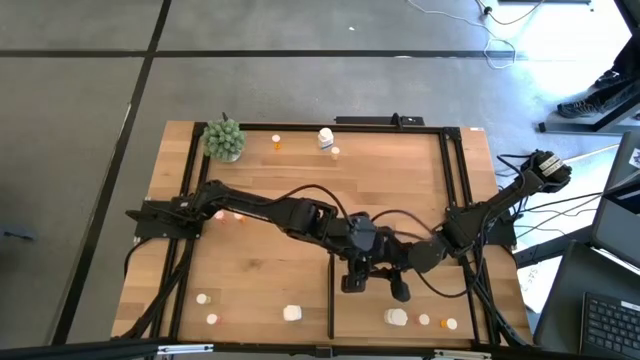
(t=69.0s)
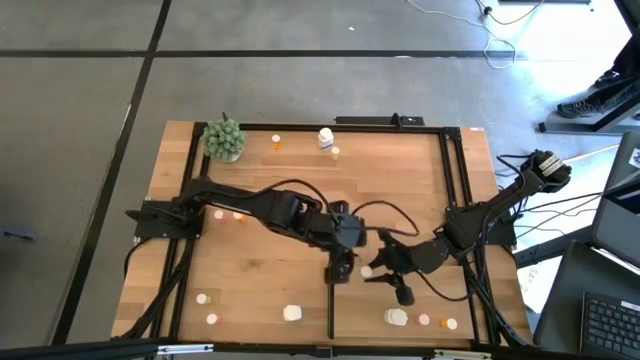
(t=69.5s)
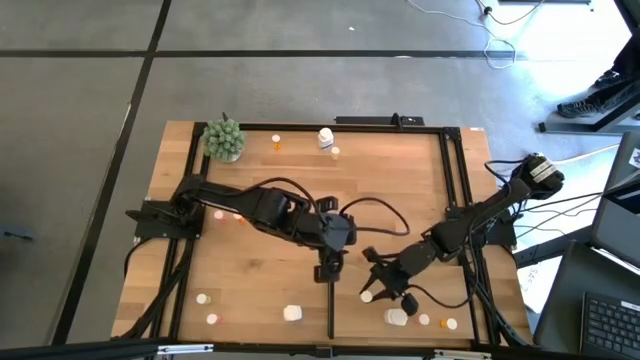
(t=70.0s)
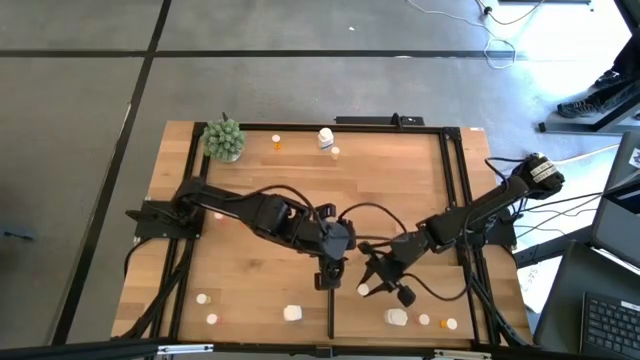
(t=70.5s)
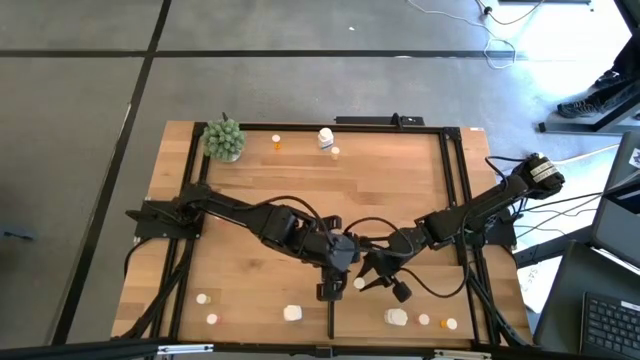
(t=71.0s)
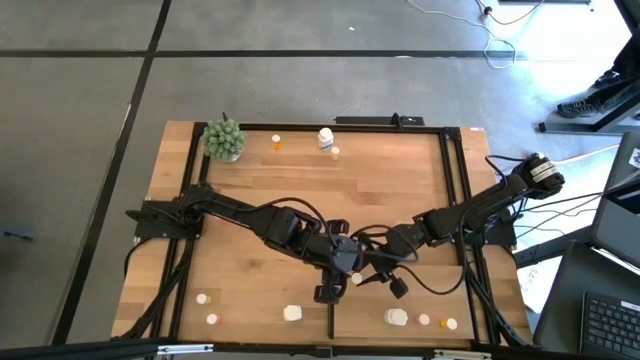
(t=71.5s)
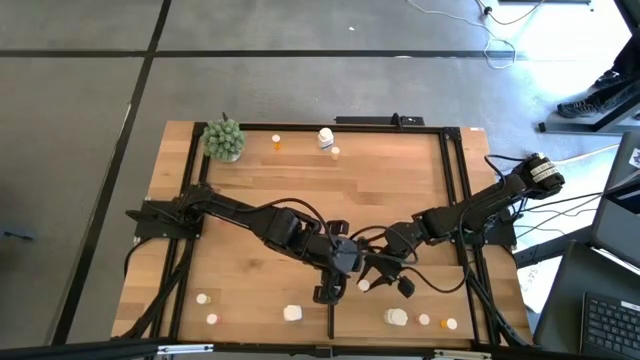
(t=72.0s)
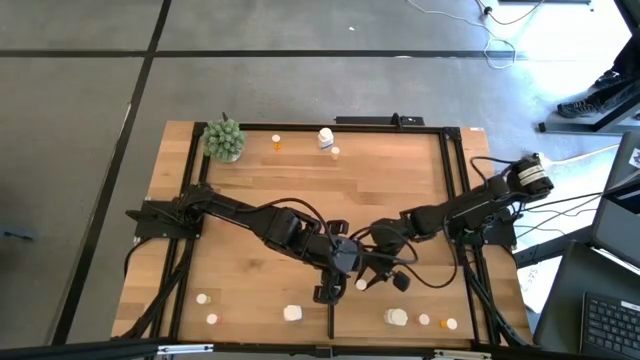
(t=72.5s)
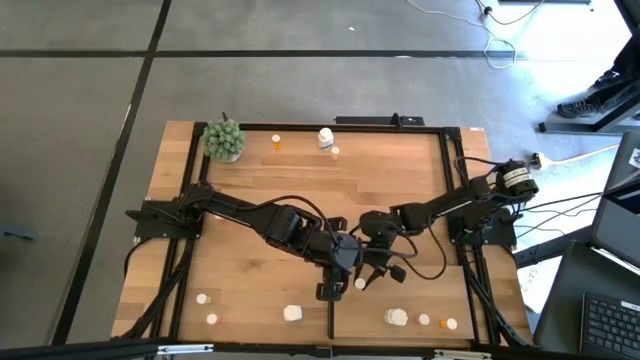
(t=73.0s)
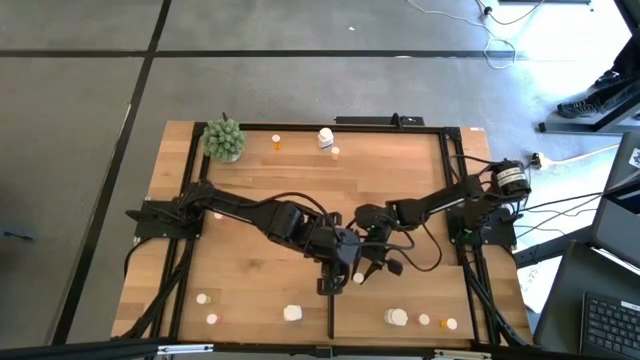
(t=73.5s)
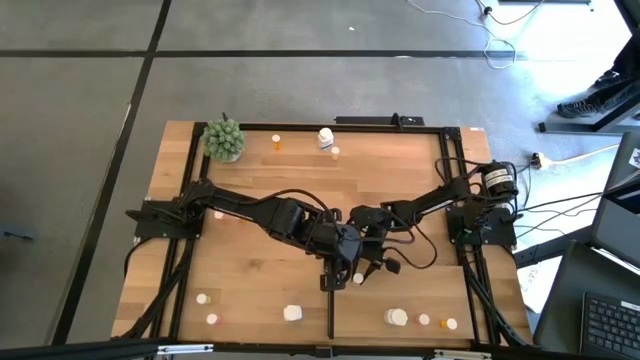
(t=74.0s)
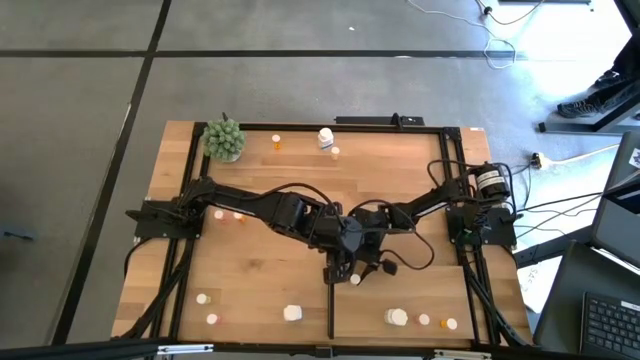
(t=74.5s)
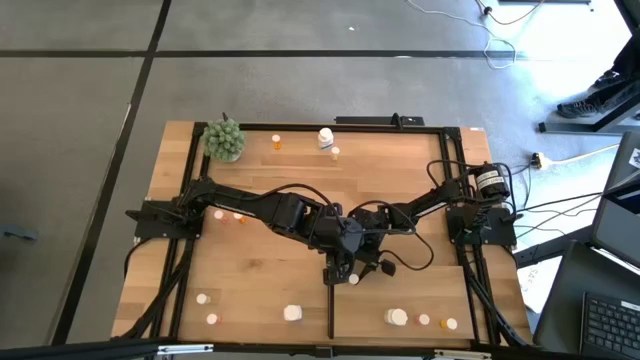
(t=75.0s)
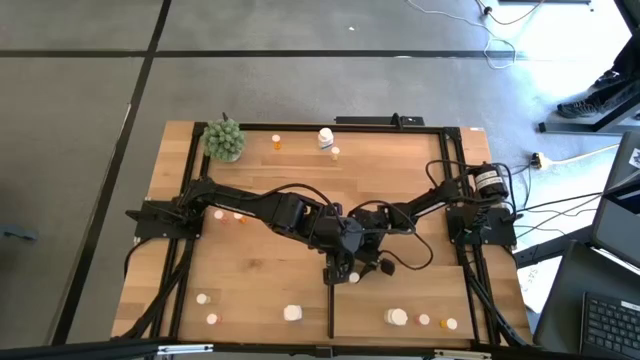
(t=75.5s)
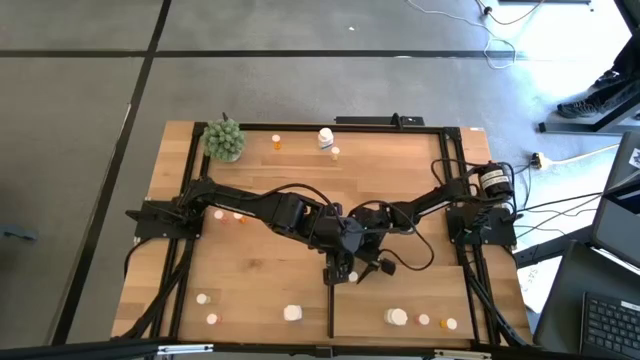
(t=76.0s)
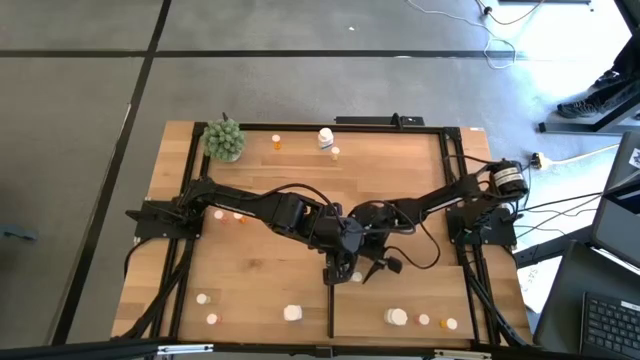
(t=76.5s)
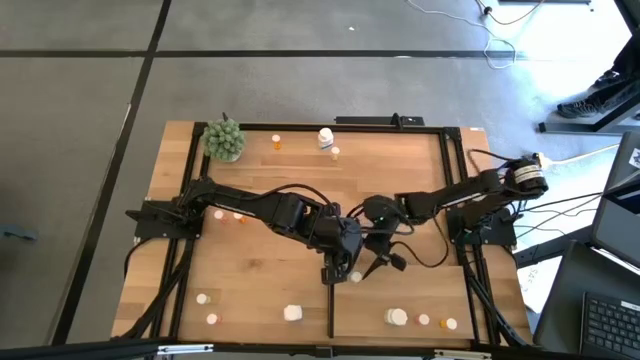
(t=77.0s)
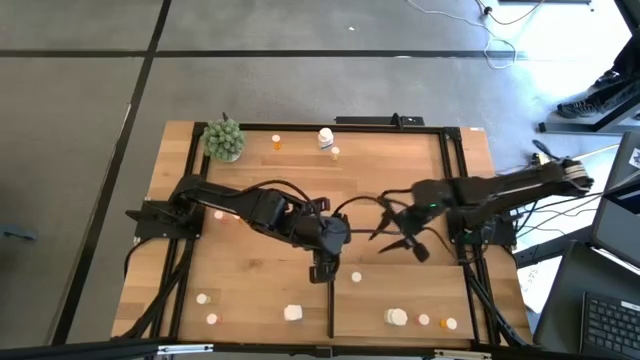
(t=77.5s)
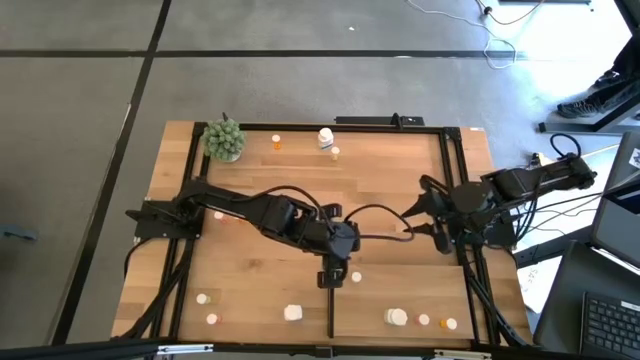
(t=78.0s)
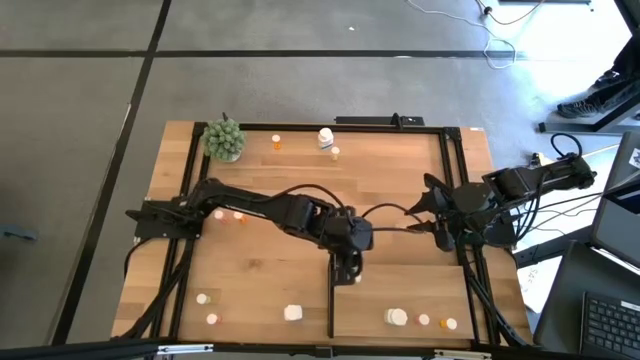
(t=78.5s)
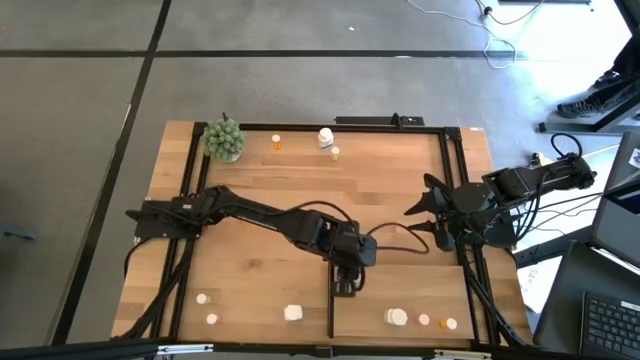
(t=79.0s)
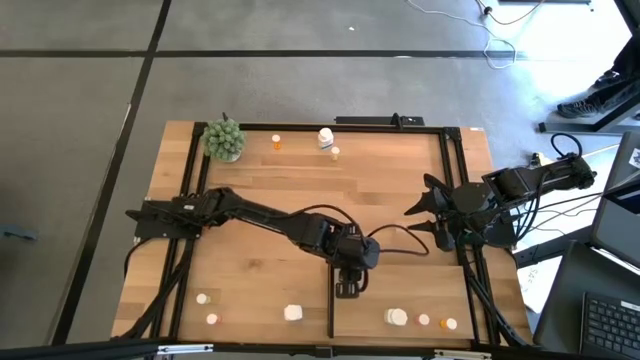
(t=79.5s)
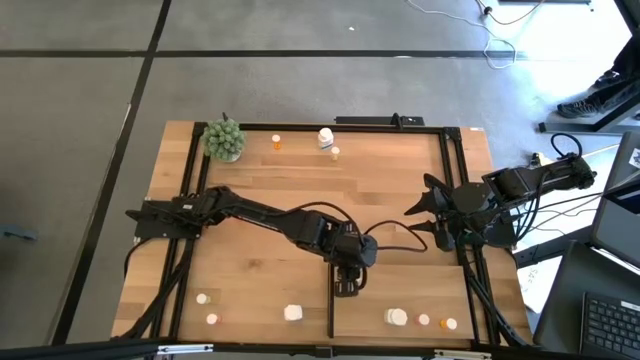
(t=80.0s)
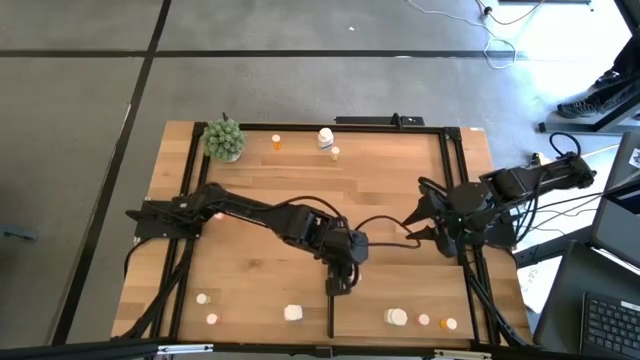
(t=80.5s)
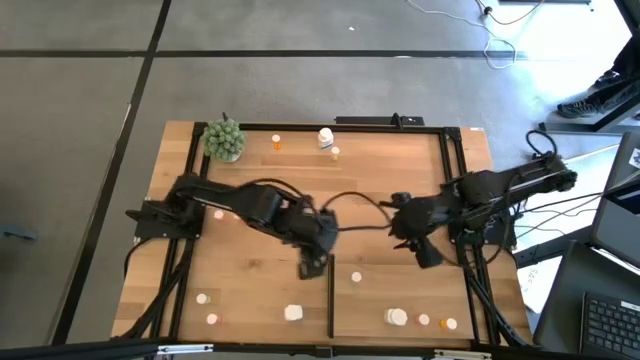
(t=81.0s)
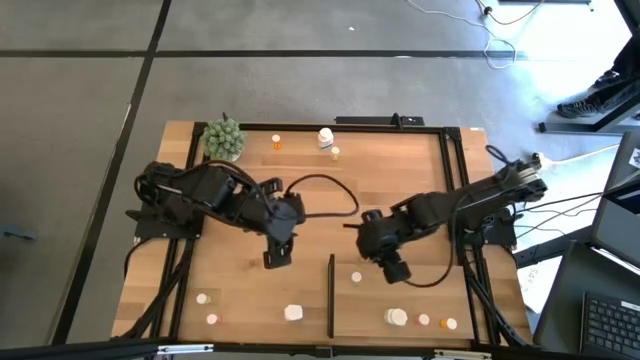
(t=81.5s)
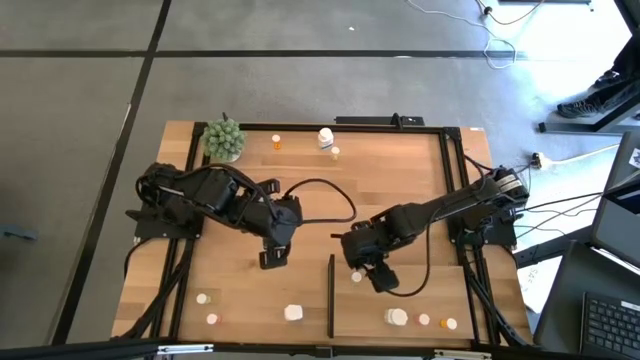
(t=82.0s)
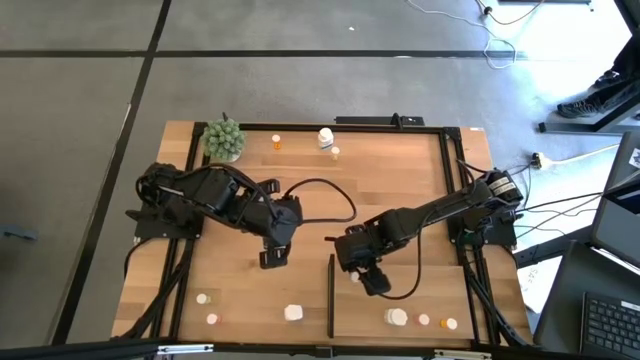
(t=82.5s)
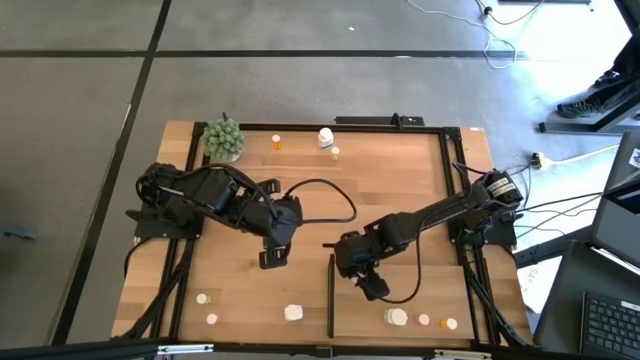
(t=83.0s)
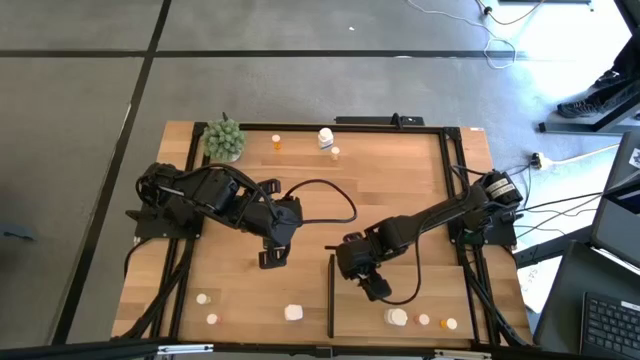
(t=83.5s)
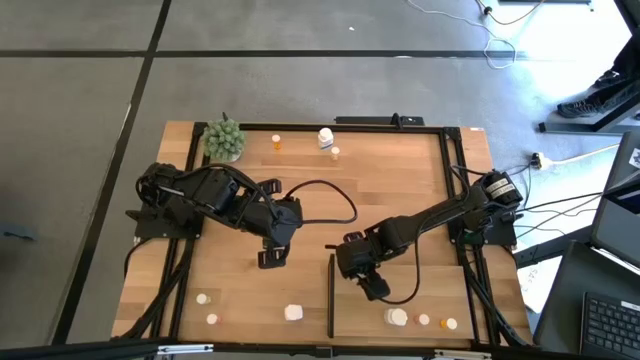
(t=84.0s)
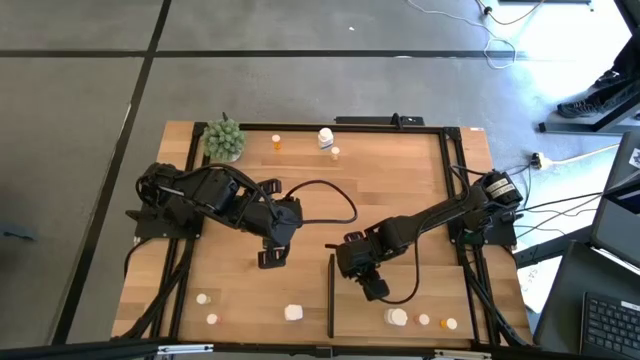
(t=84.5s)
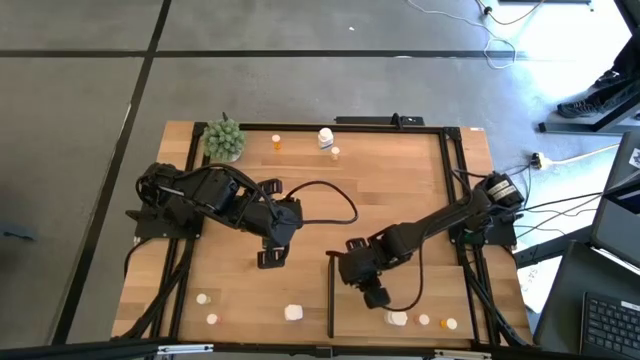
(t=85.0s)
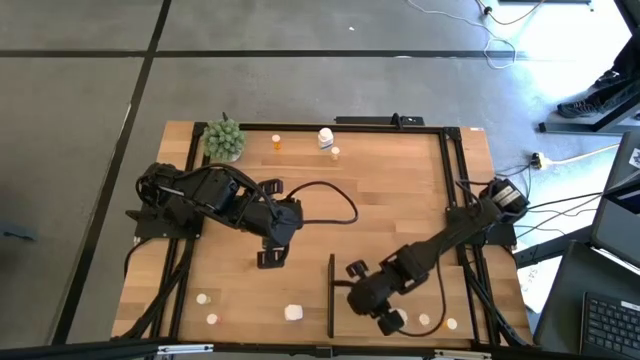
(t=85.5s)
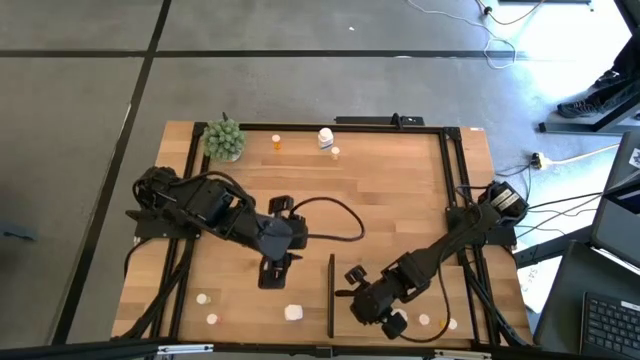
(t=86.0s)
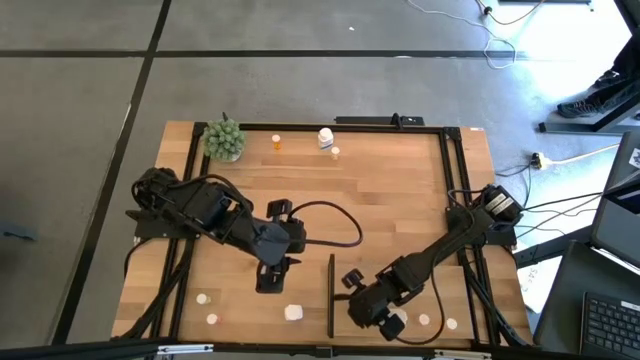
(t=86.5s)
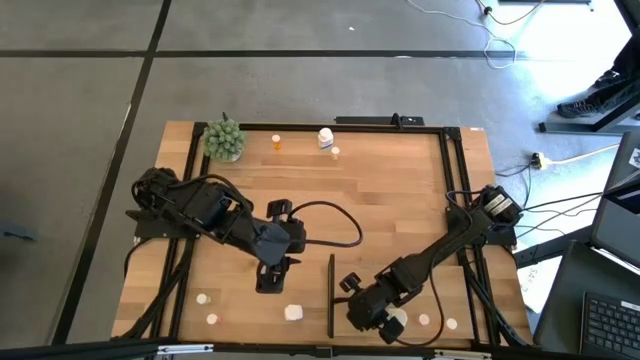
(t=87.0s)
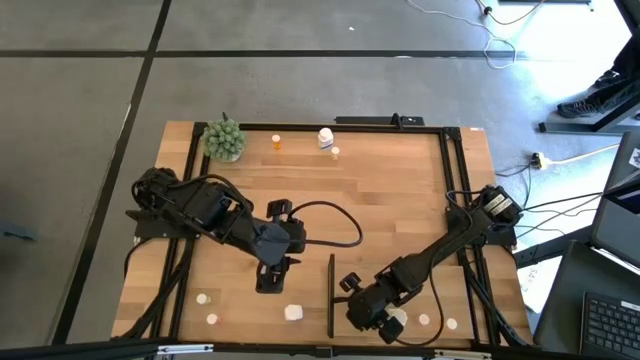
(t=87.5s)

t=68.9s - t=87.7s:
Task: Pick and place medicine bottles onto shelf by color
Put the middle yellow pill bottle on the shelf

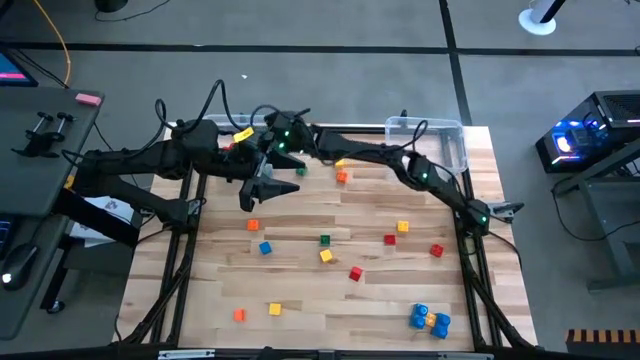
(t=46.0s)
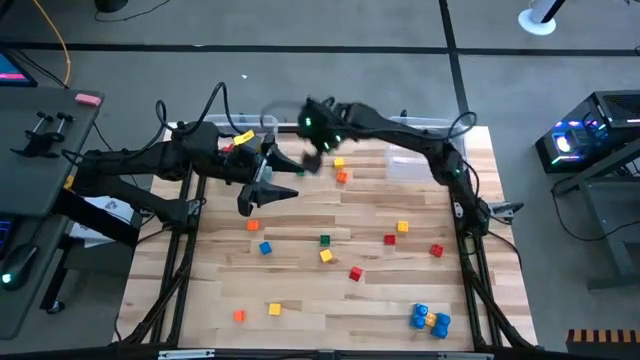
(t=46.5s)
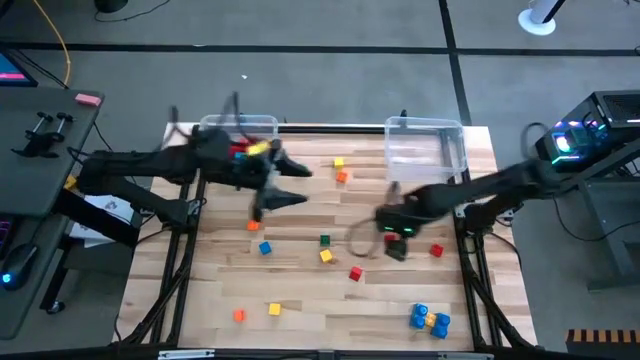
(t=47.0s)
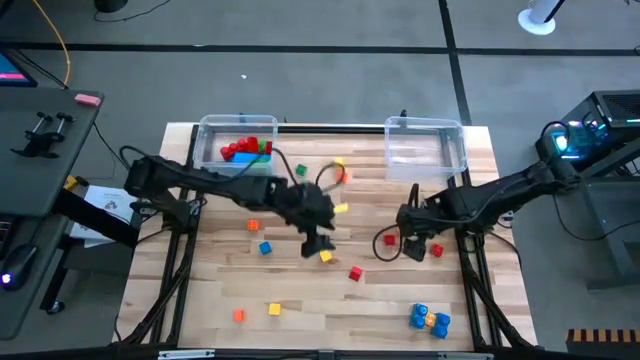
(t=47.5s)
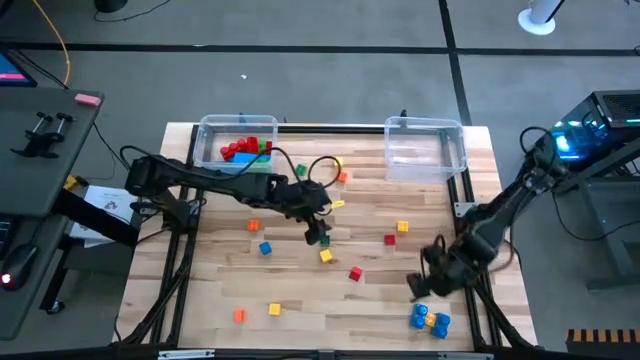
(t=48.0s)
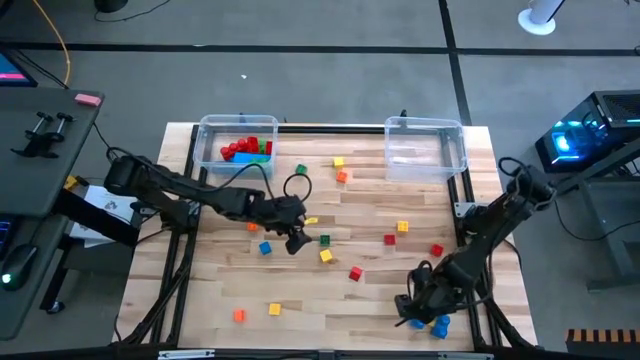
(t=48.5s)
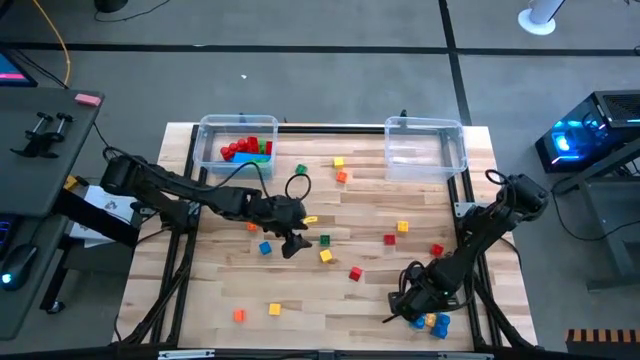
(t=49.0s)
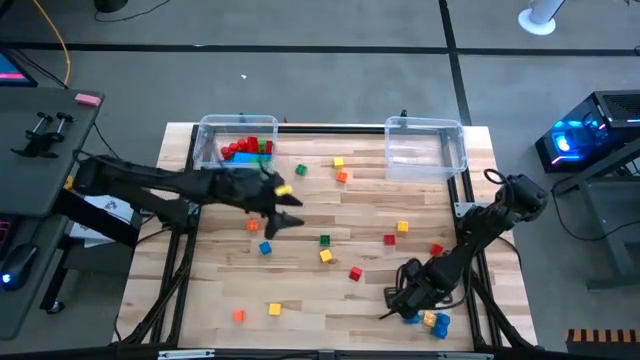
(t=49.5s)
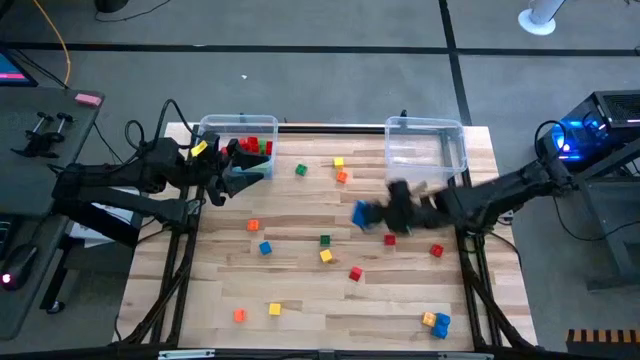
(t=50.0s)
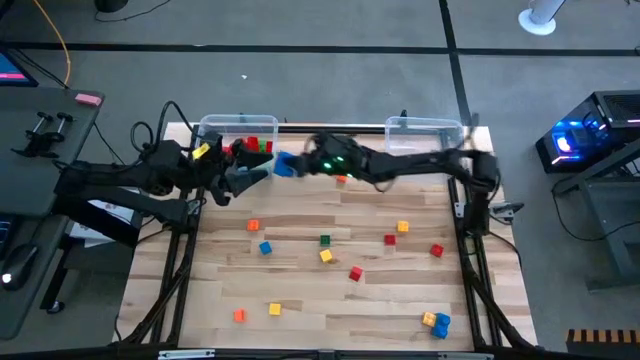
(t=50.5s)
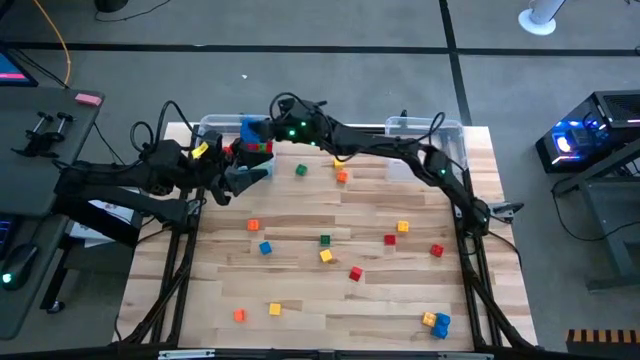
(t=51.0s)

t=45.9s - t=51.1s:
Task: Sort blocks by size
Put the large game piece into the left transparent bin
